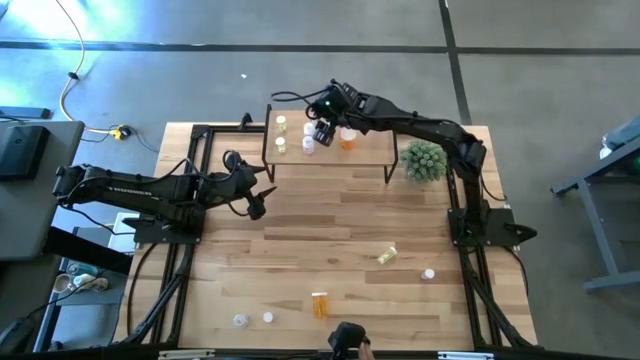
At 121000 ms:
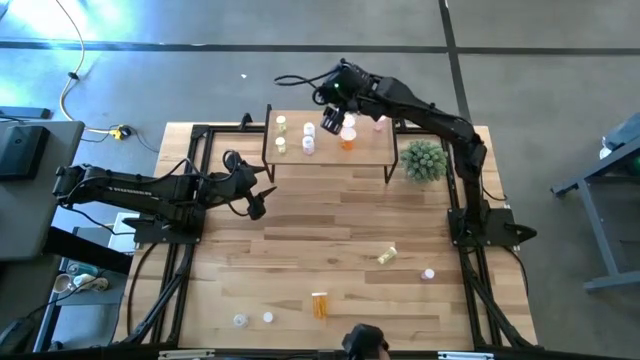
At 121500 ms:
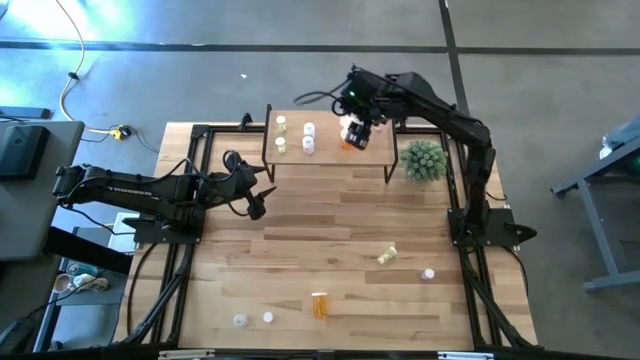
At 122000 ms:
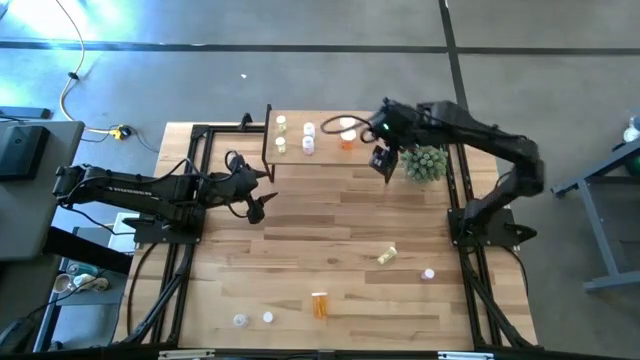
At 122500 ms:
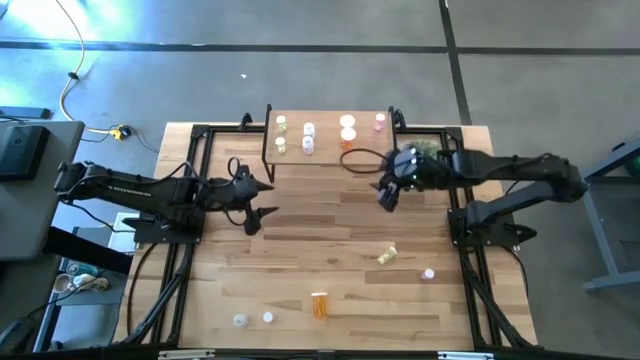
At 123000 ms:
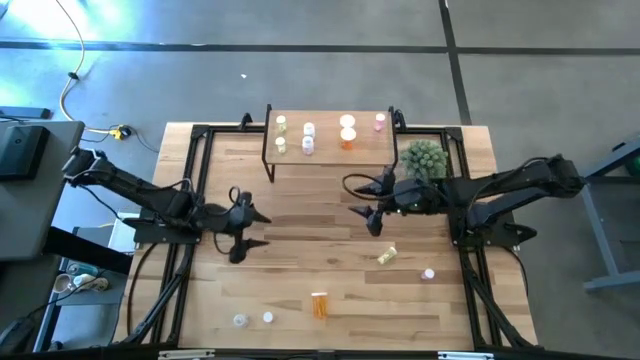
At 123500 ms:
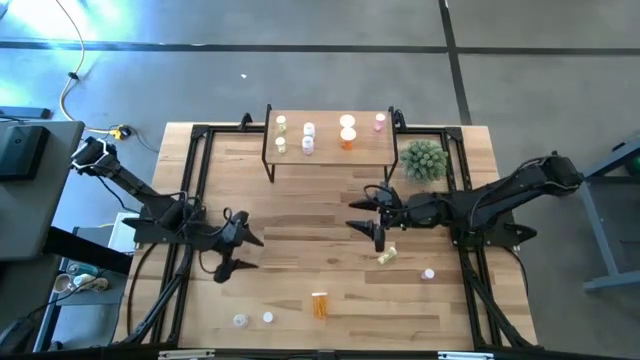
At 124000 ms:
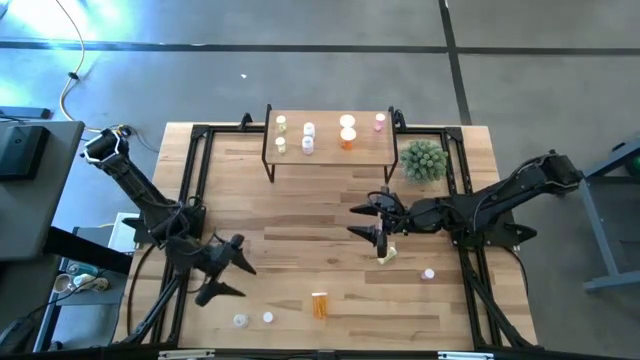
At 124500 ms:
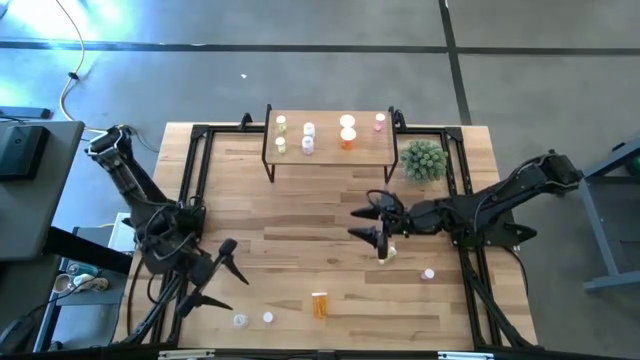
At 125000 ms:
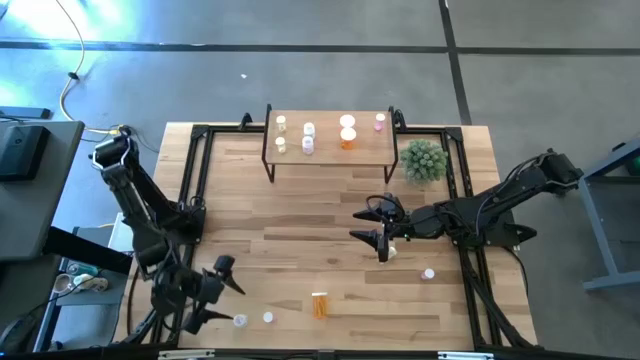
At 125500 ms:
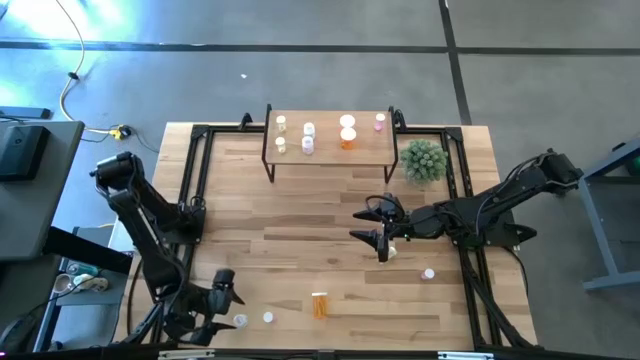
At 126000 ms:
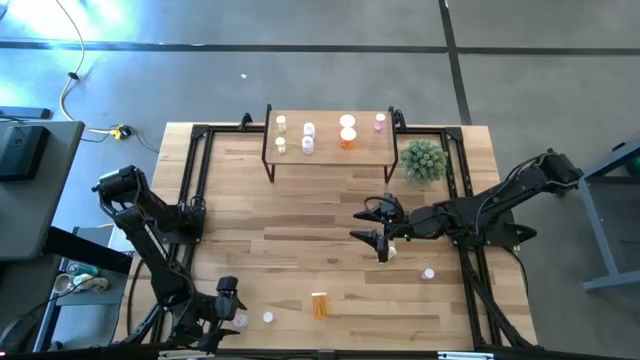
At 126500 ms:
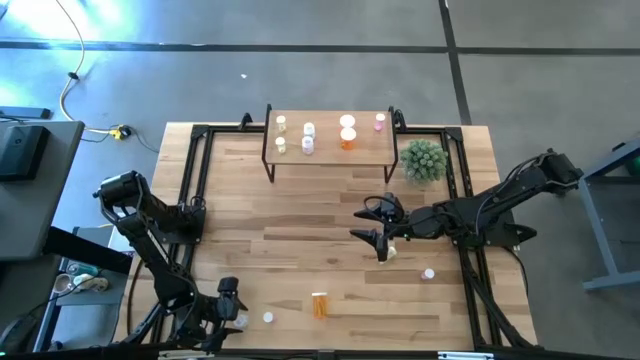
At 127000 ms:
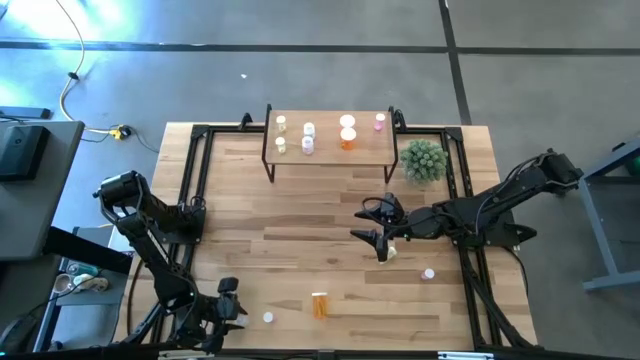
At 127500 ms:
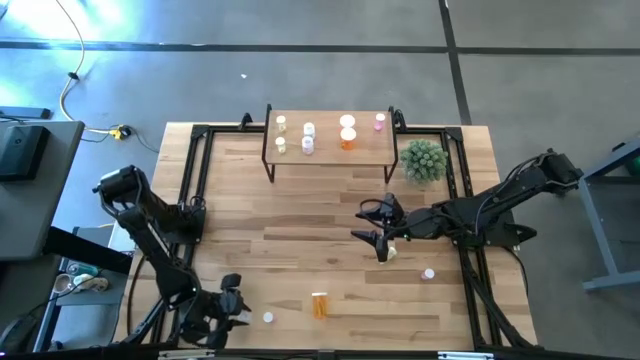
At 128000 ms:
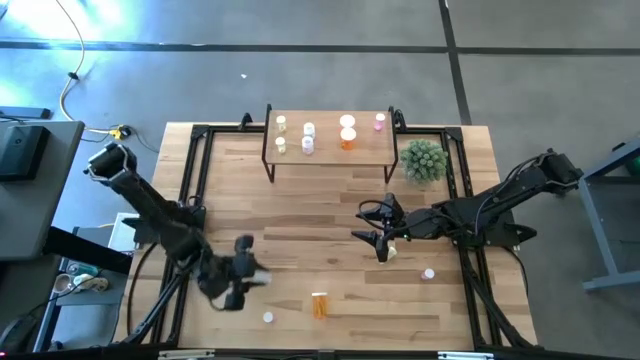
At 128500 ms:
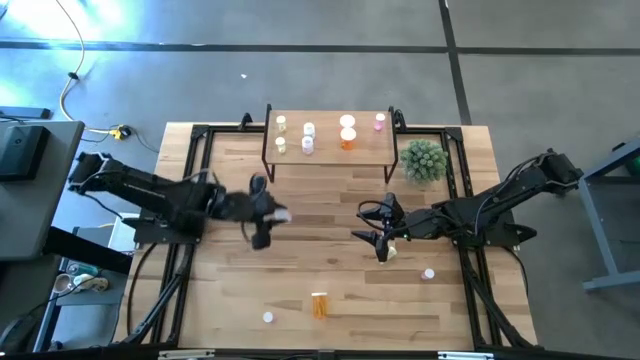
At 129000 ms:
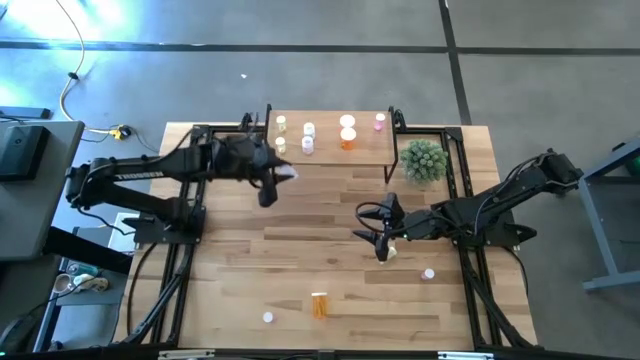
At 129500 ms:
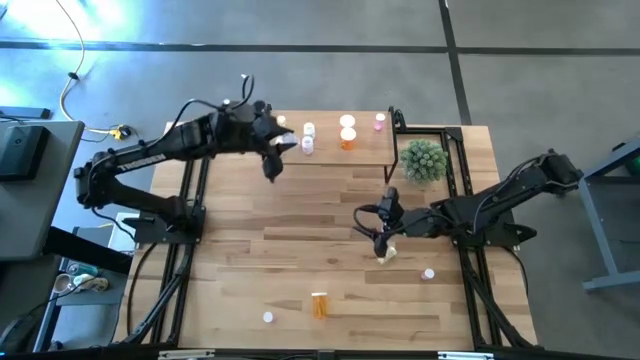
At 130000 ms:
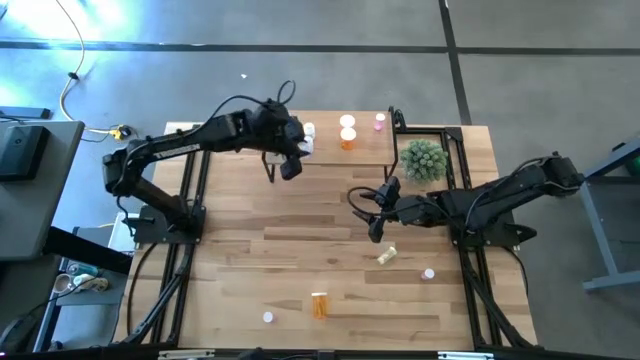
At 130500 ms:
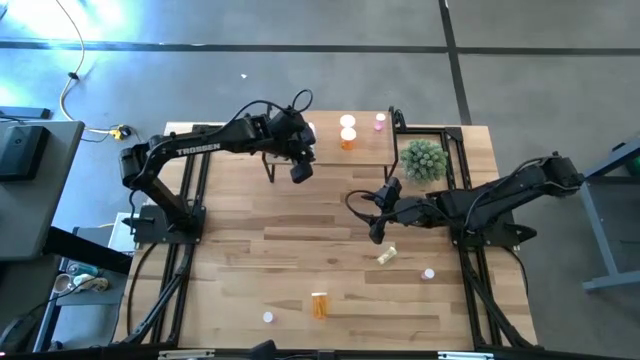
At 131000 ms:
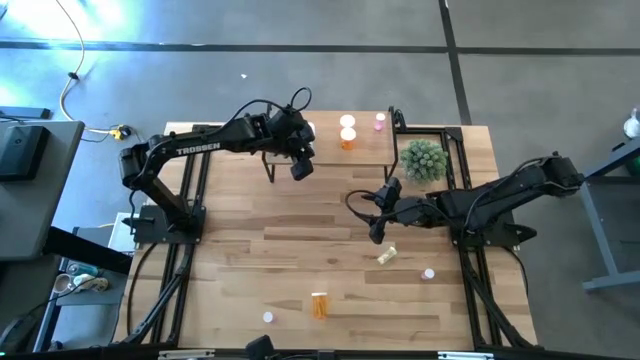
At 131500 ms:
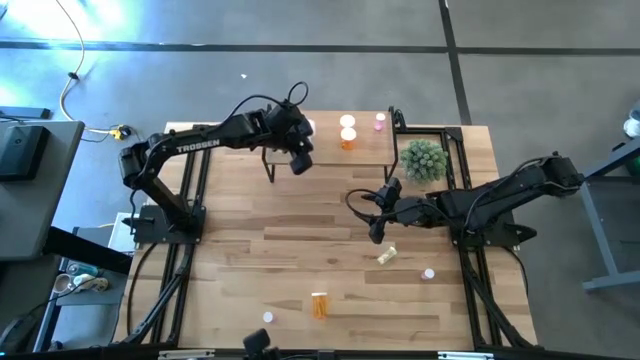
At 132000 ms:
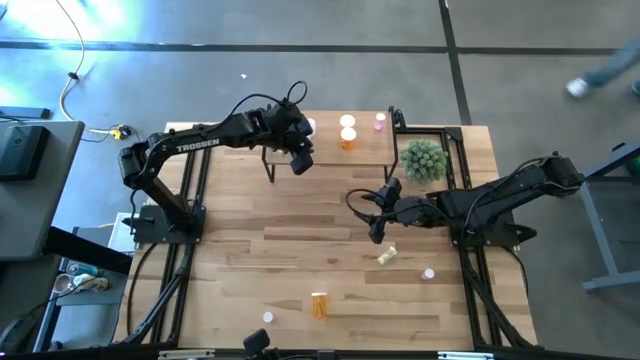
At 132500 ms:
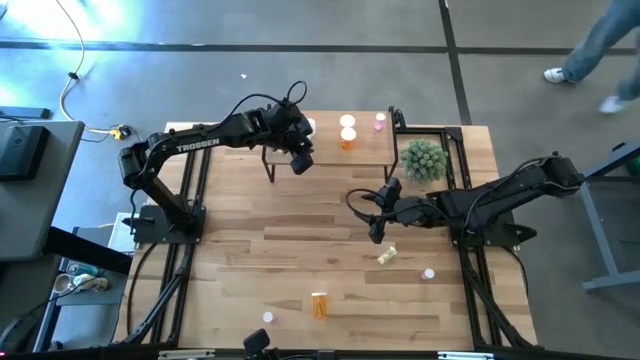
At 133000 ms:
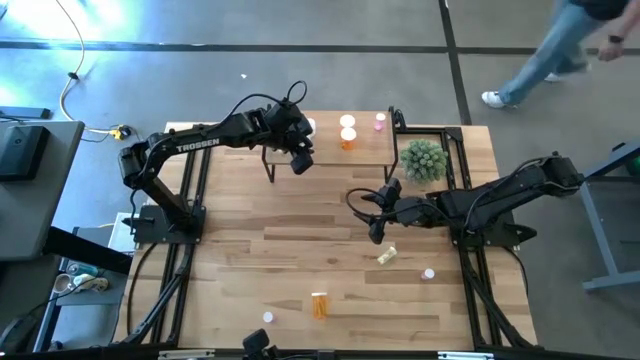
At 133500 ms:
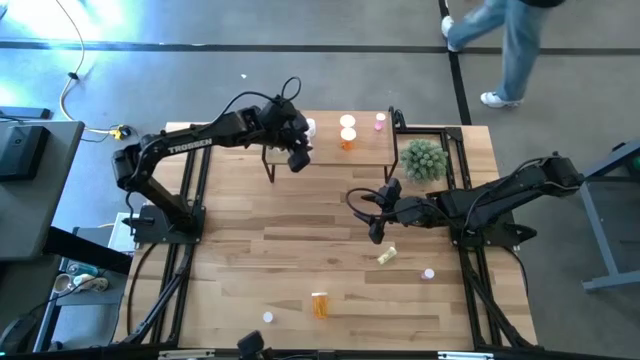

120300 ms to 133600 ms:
Task: Pick and place medicine bottles onto shelf by color
Put the transparent pill bottle aligned with the other transparent pill bottles on the shelf

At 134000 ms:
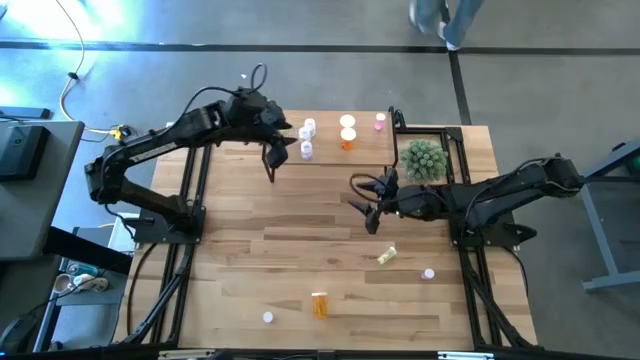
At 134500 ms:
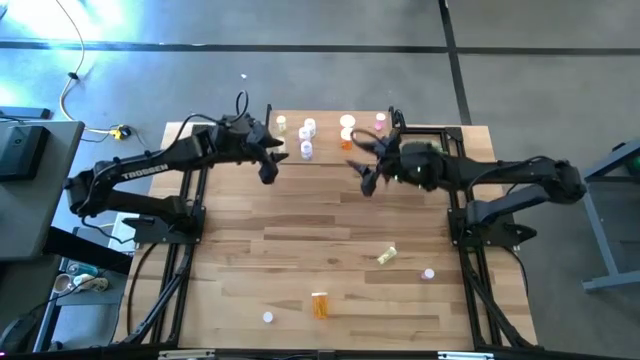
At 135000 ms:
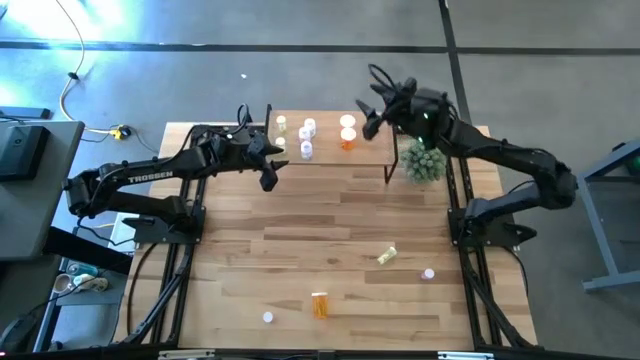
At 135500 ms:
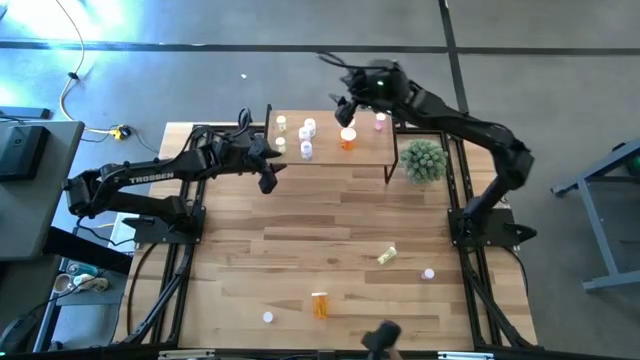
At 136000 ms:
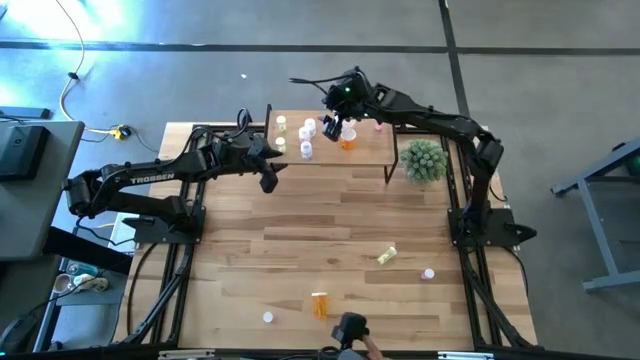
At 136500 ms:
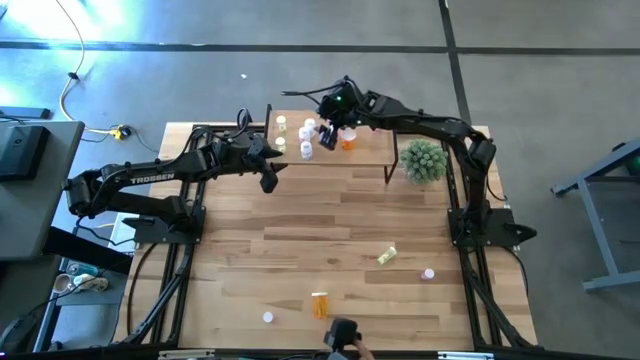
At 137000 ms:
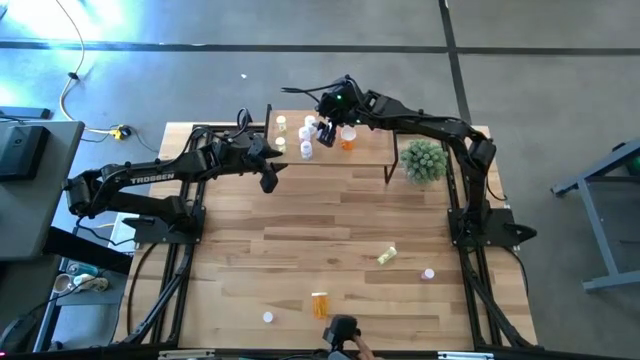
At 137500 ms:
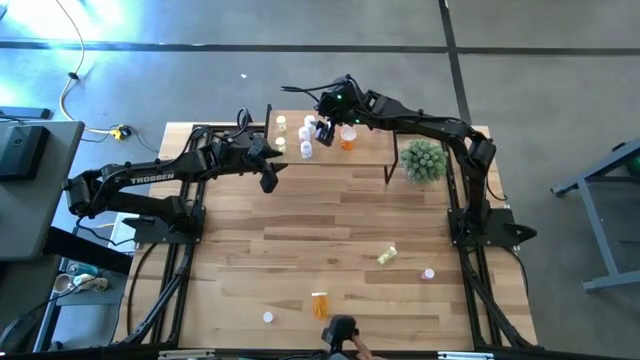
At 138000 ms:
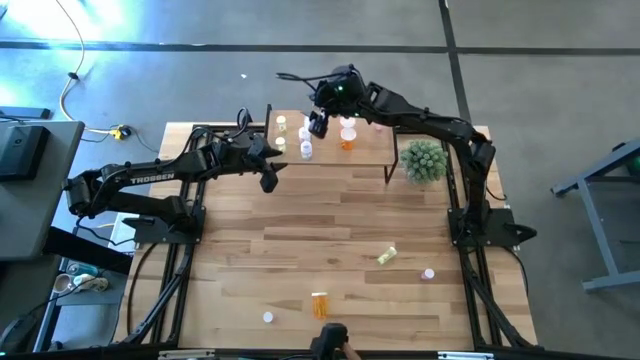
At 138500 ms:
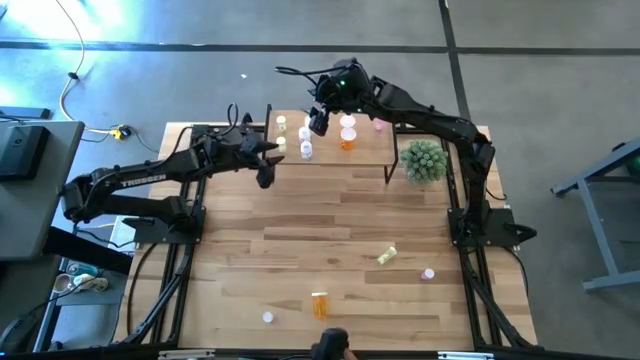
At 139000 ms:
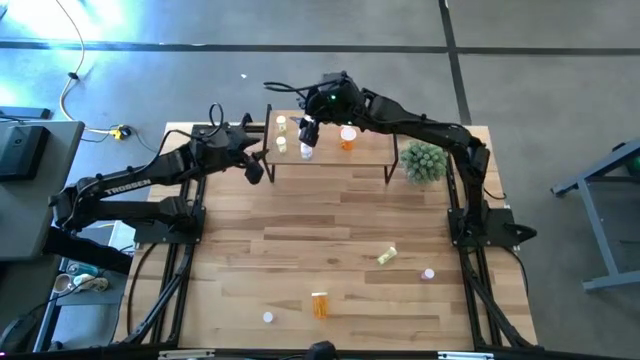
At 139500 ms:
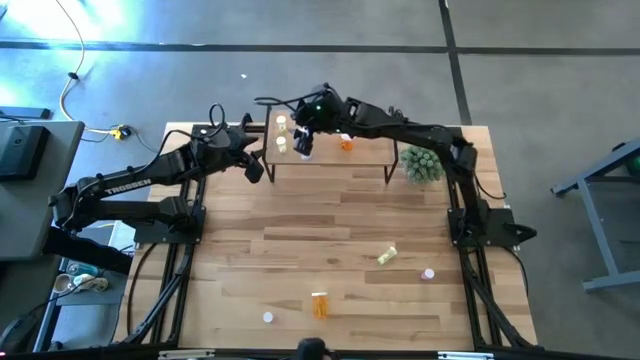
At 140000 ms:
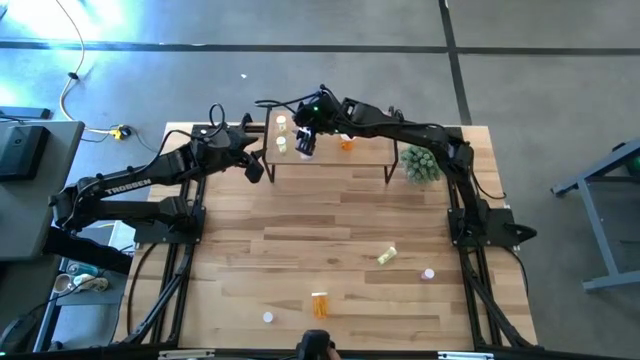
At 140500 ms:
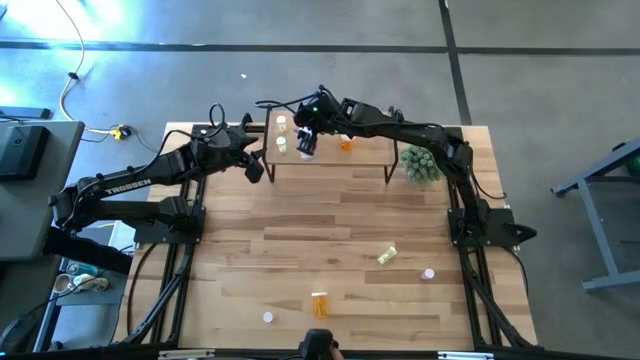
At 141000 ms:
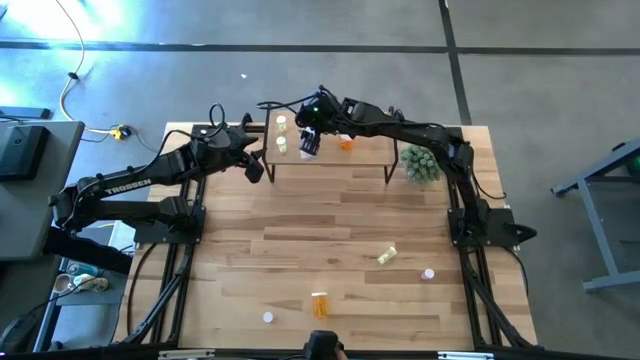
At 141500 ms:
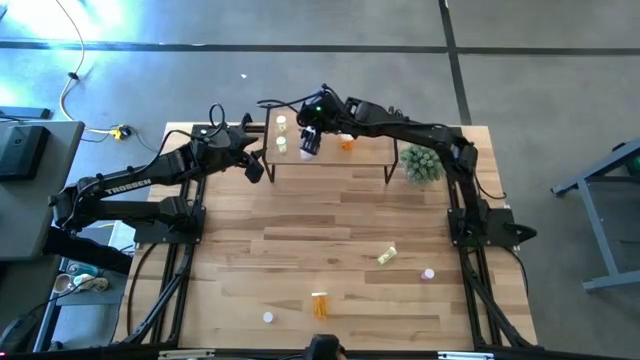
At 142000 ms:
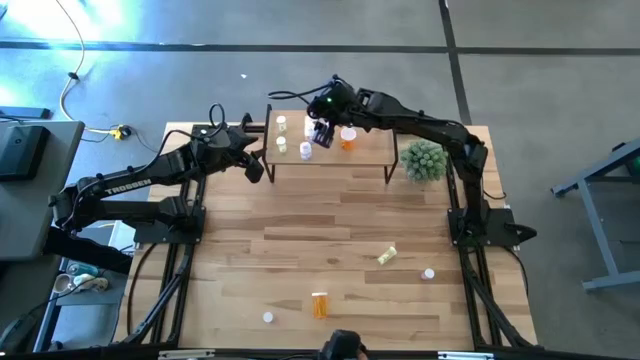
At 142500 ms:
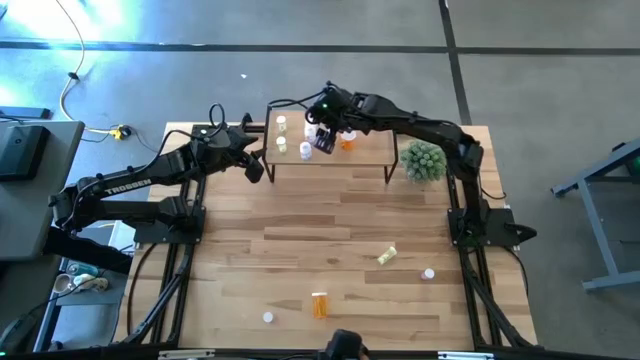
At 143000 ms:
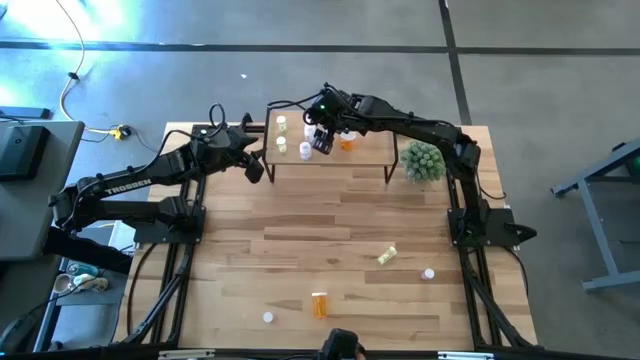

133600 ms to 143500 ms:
Adjust the pill bottles on the shelf
